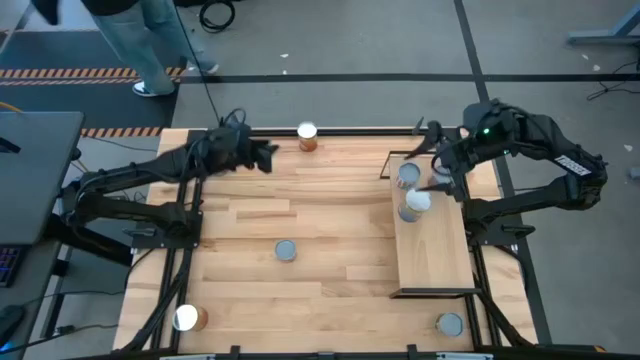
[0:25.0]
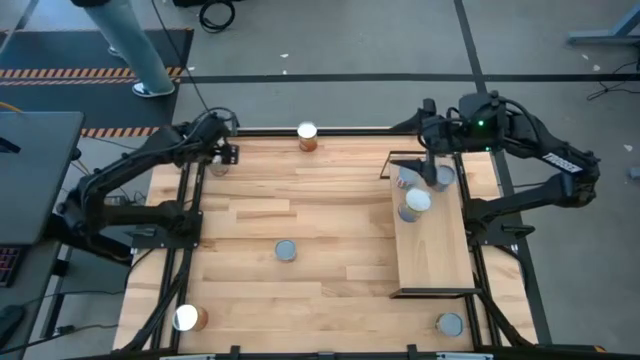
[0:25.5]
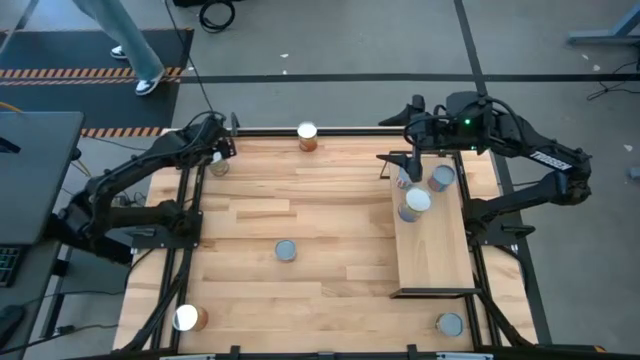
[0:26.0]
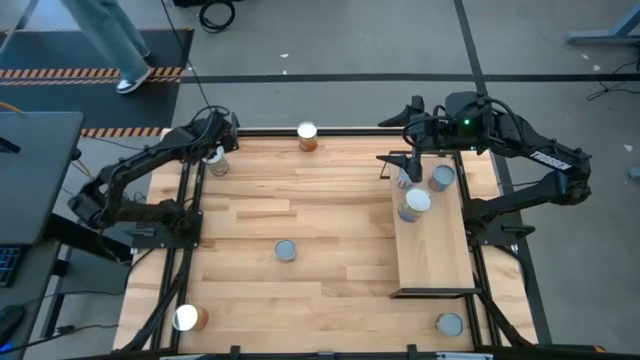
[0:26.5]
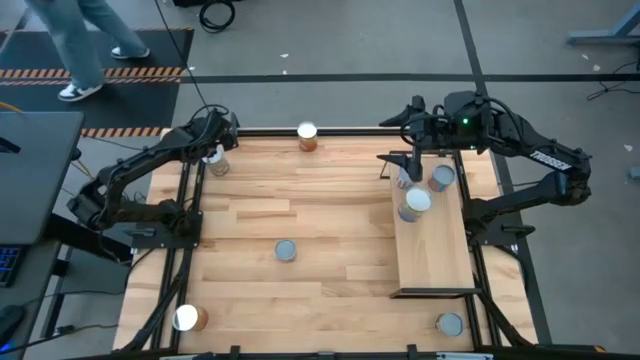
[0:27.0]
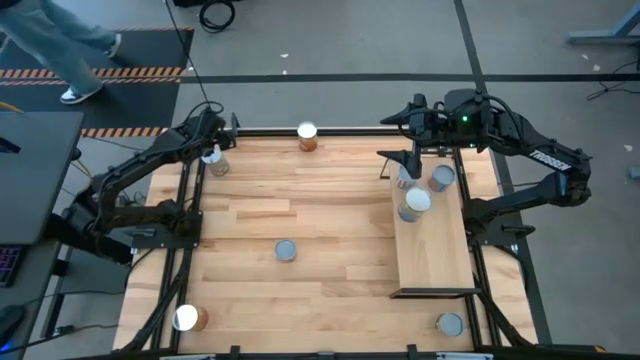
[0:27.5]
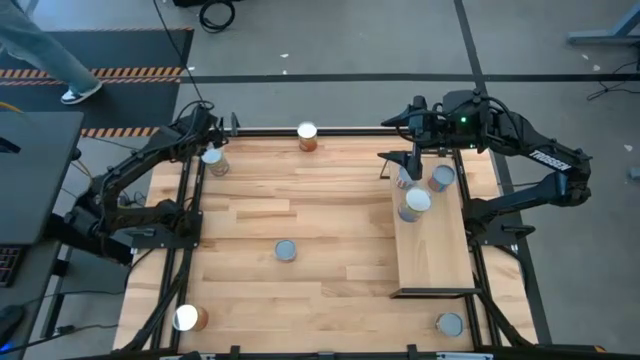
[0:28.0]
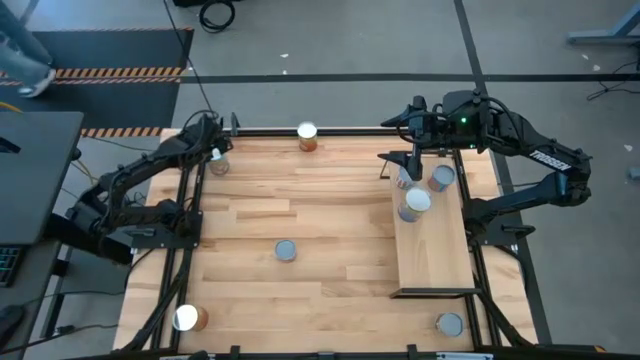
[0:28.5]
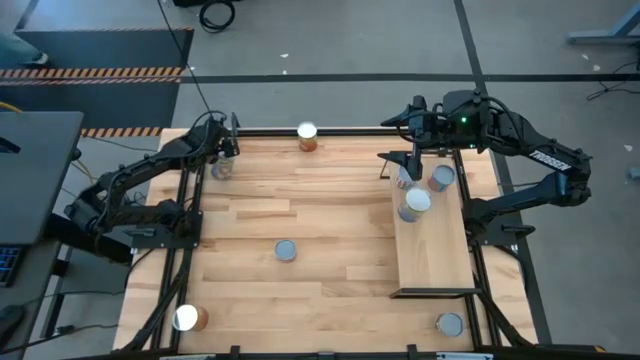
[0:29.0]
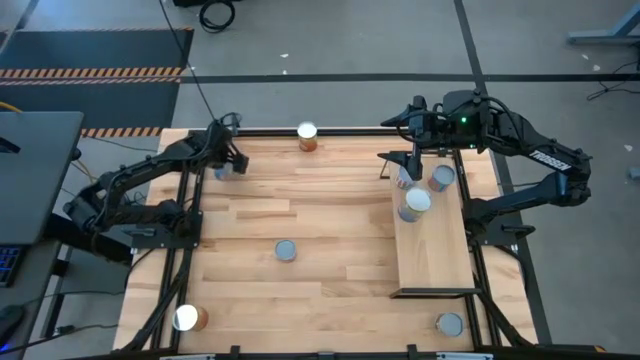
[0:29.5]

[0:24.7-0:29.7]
Task: Pick and place cans onto a shelf
Put the canned peaches on the shelf

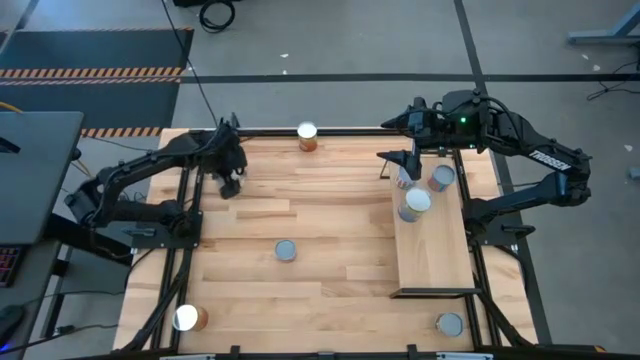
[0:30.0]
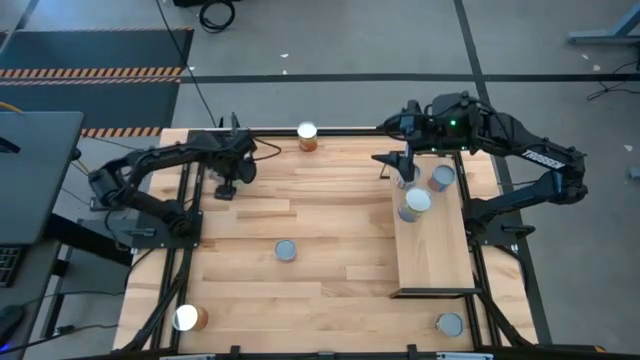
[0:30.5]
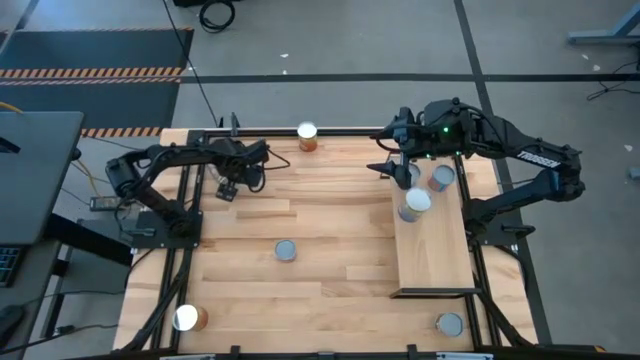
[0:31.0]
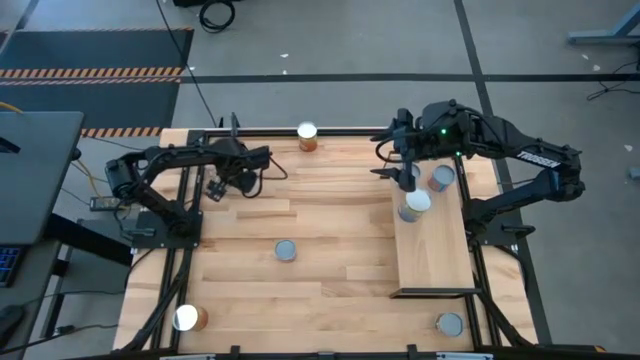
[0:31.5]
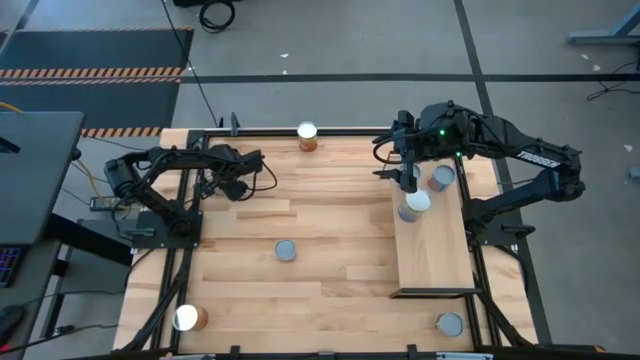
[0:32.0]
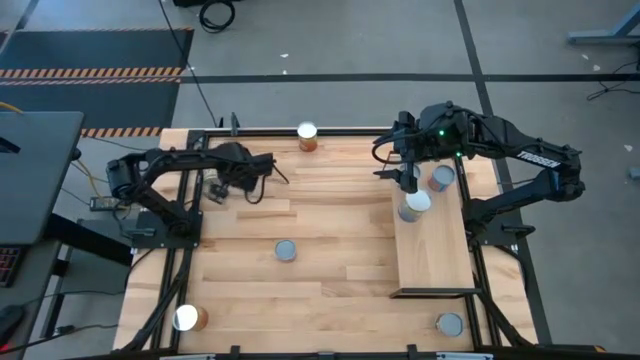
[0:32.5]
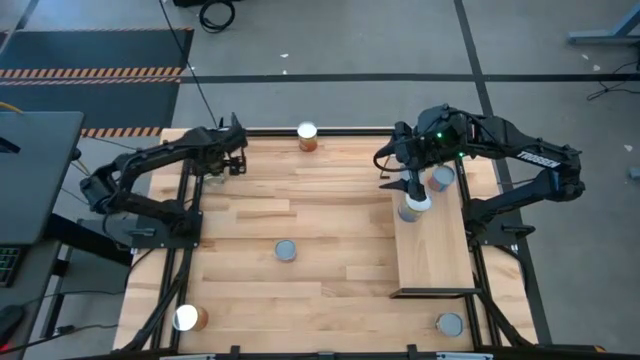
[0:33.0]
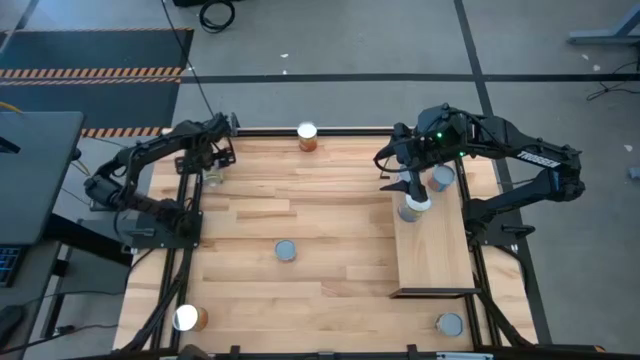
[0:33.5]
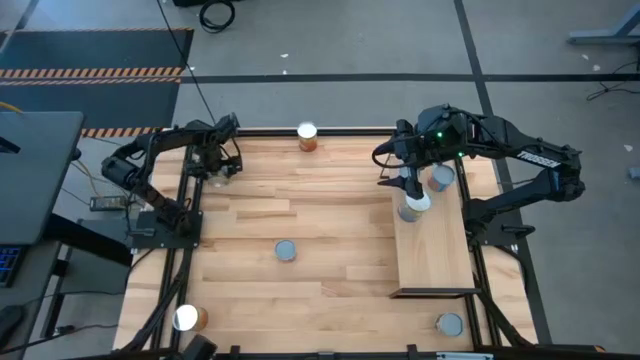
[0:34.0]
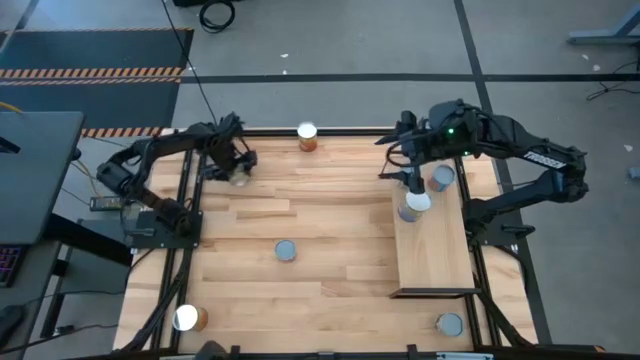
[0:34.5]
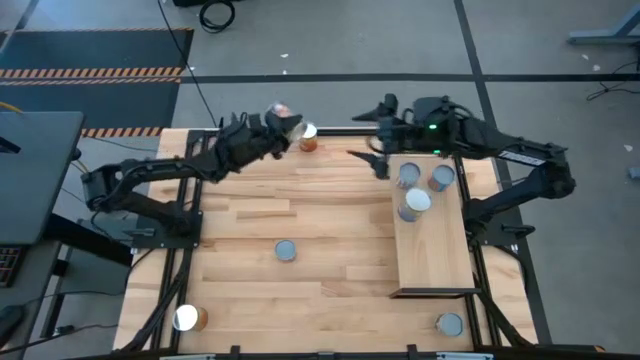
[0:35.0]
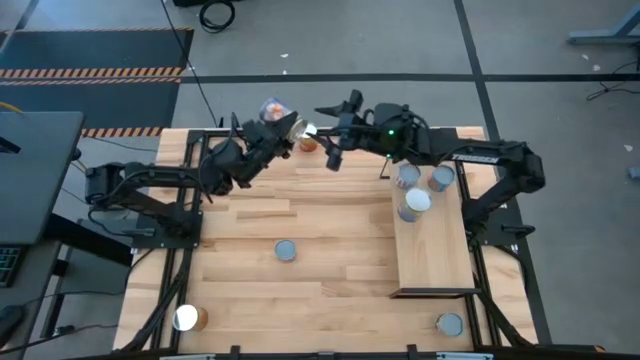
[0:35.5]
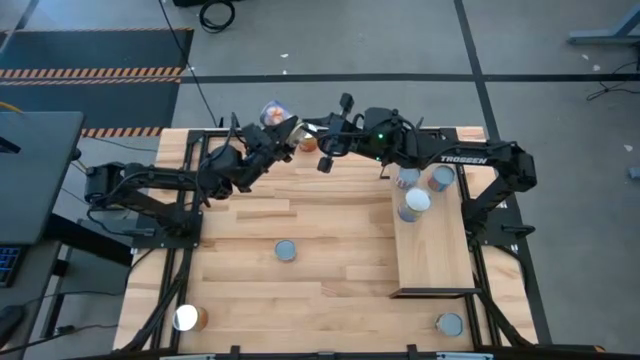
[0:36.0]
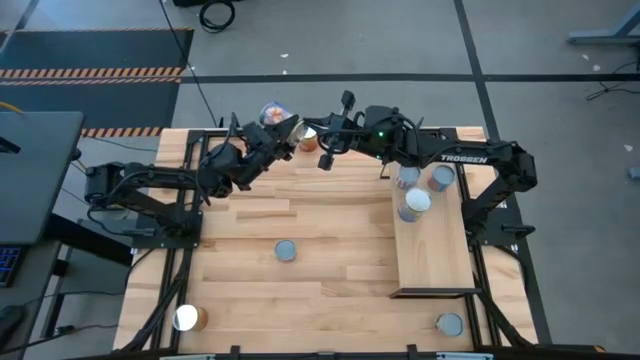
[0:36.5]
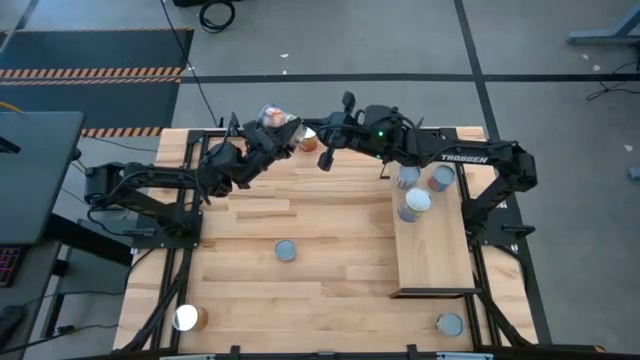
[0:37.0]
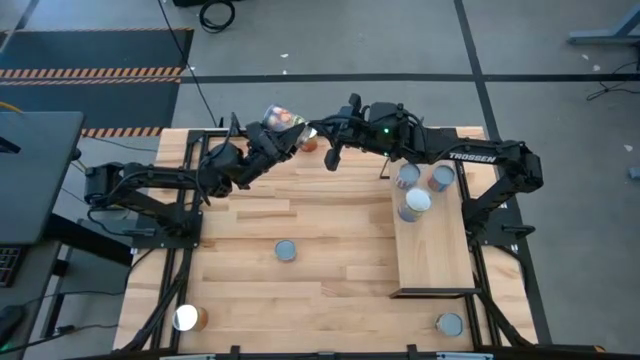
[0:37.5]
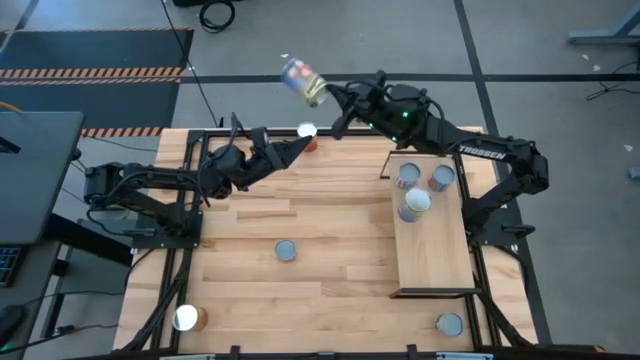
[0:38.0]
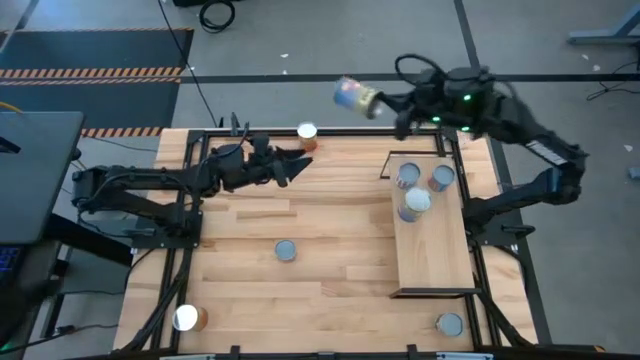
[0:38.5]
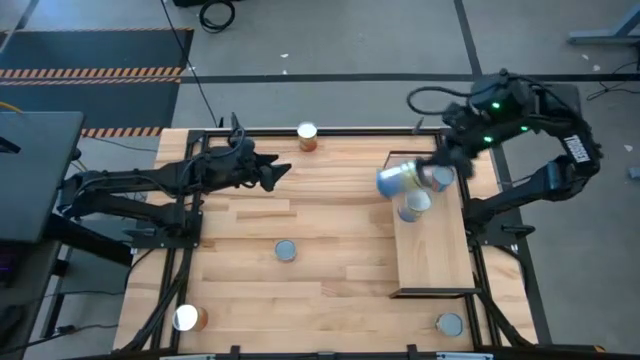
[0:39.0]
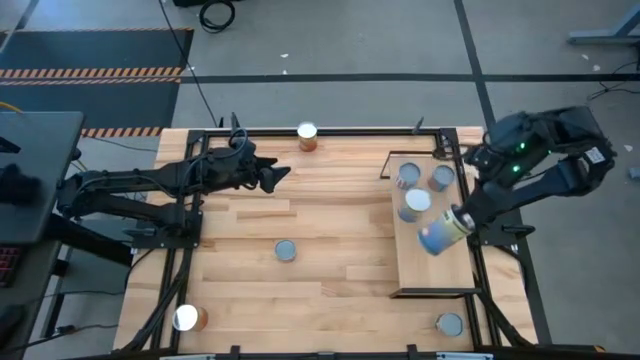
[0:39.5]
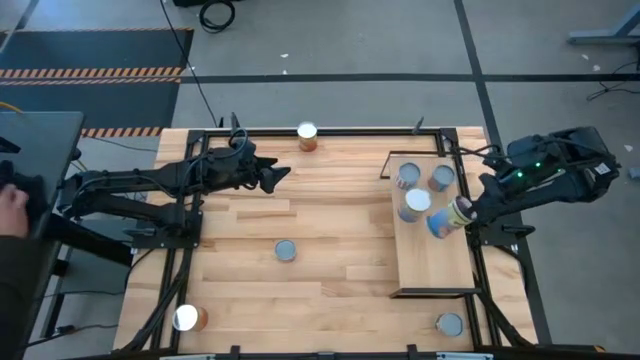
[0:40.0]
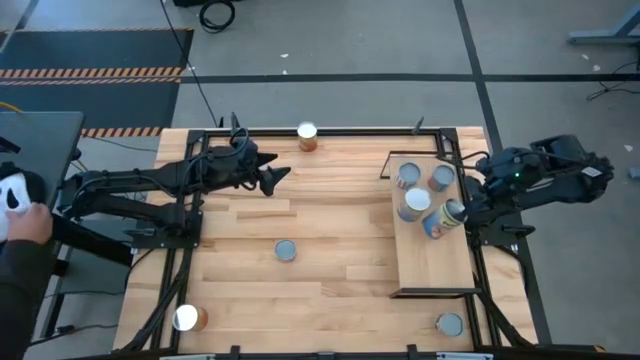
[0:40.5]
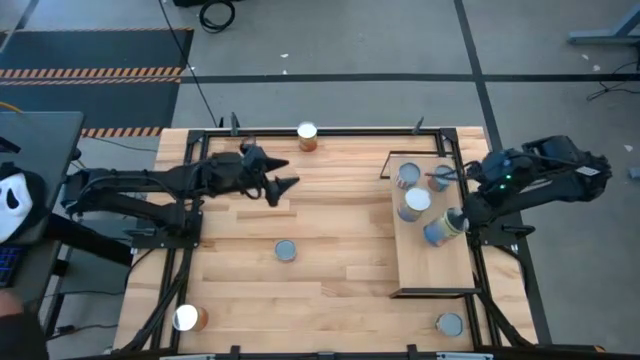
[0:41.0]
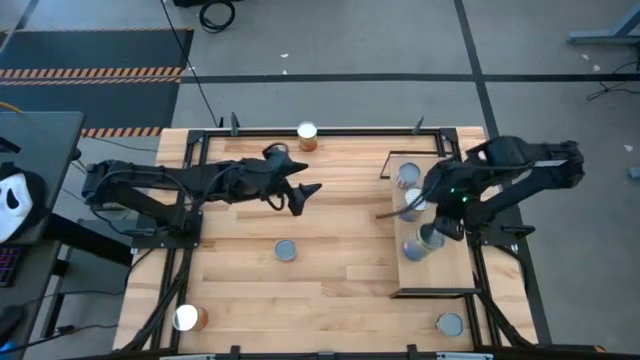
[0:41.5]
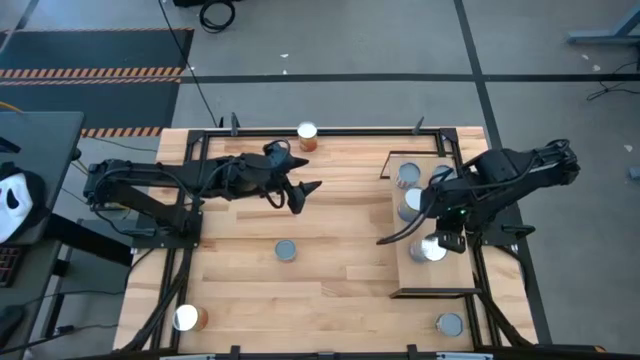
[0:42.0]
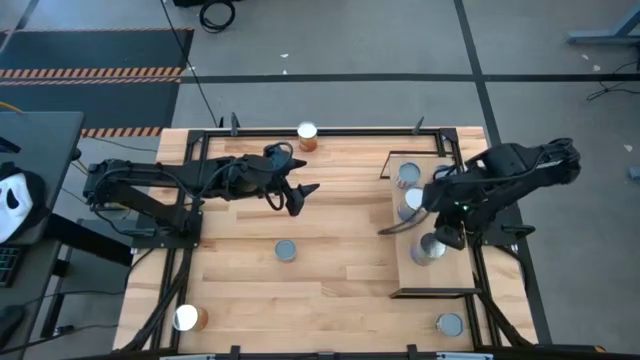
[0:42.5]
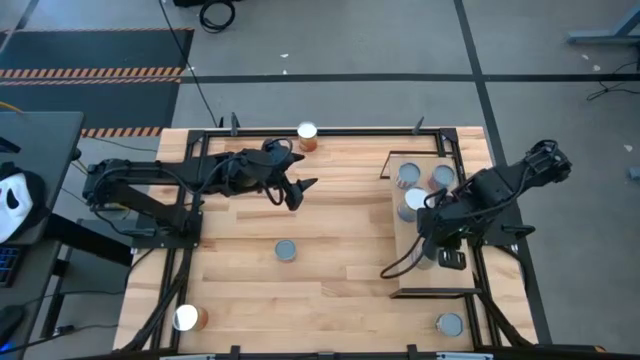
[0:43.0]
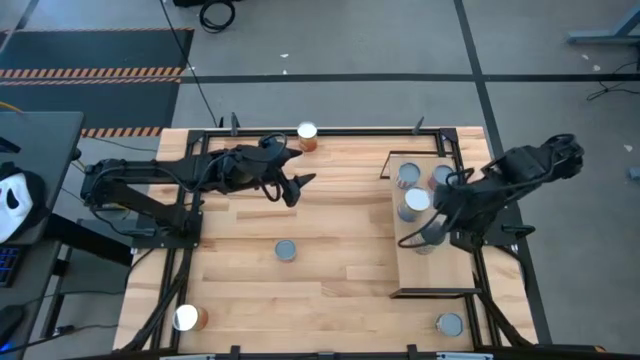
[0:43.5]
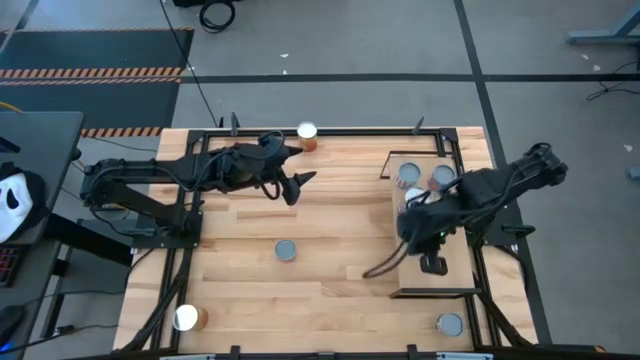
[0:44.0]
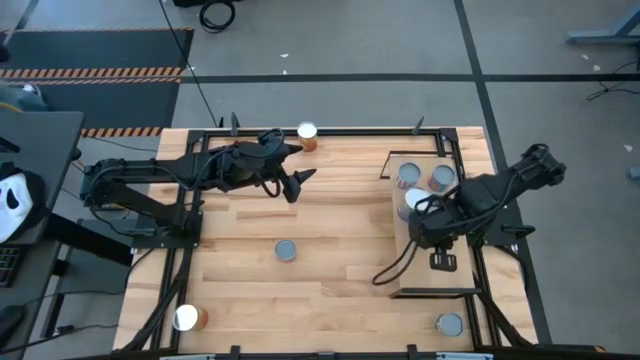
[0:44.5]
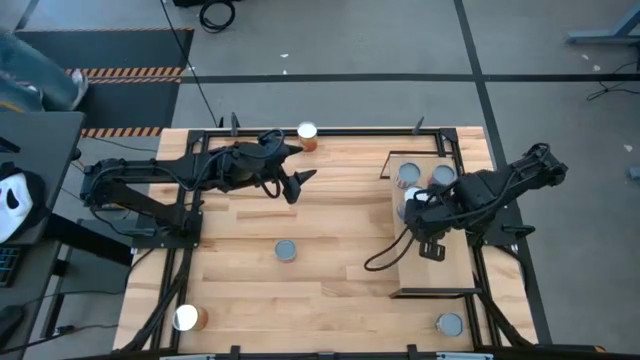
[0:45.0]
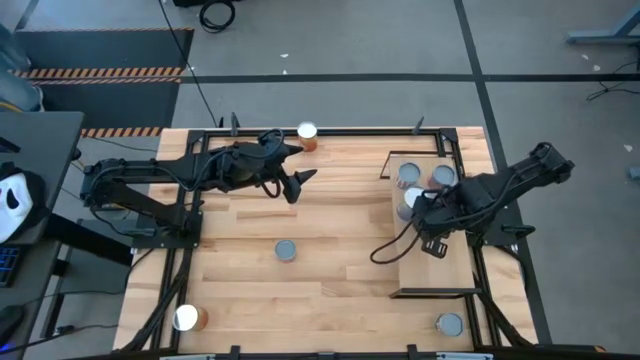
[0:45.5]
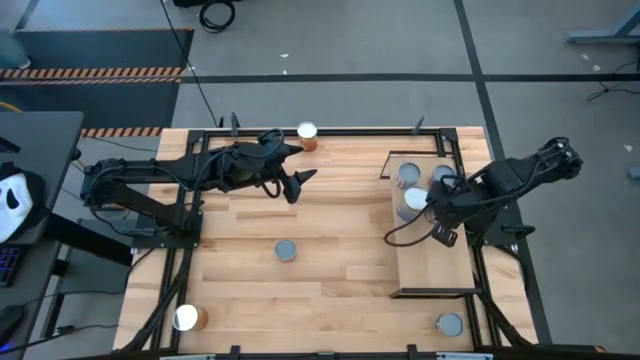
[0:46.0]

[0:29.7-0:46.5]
Put the canned peaches on the shelf
